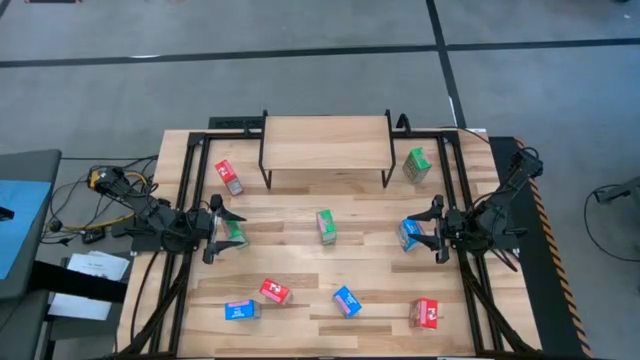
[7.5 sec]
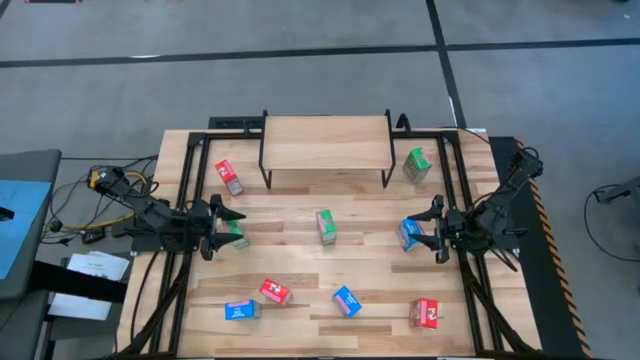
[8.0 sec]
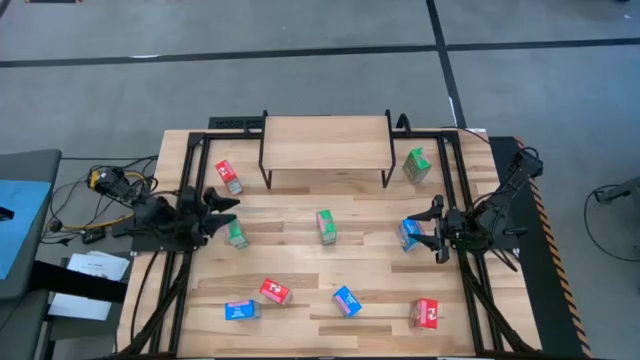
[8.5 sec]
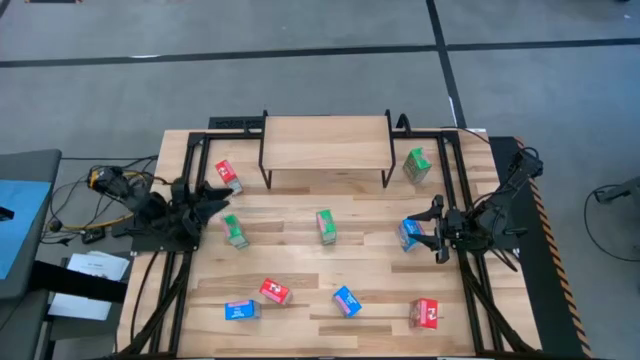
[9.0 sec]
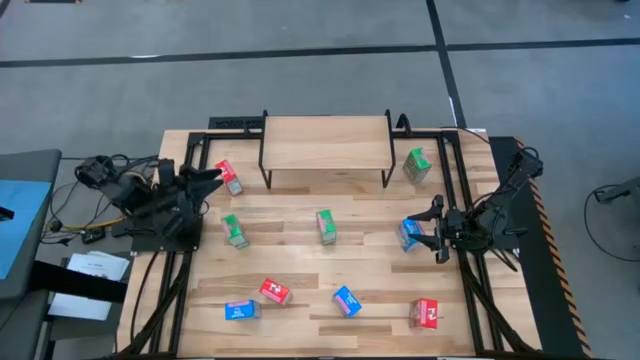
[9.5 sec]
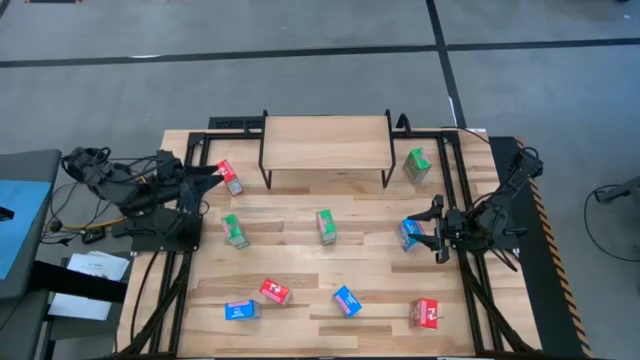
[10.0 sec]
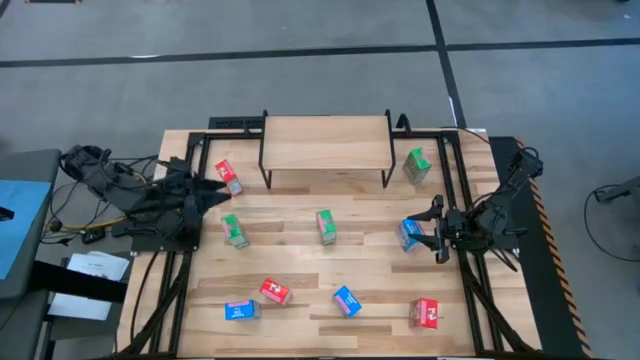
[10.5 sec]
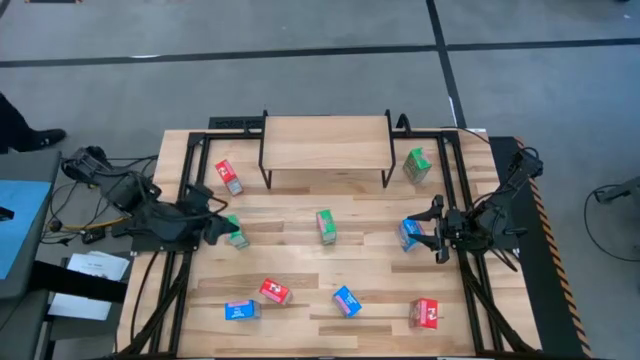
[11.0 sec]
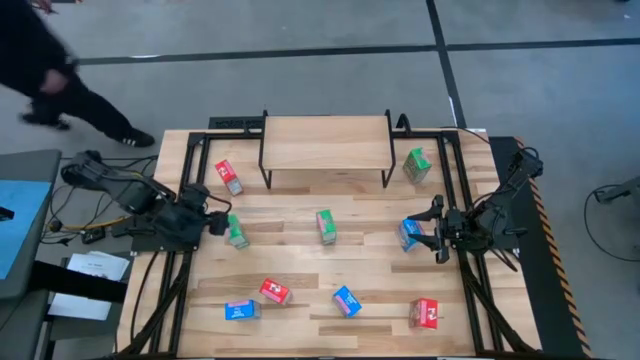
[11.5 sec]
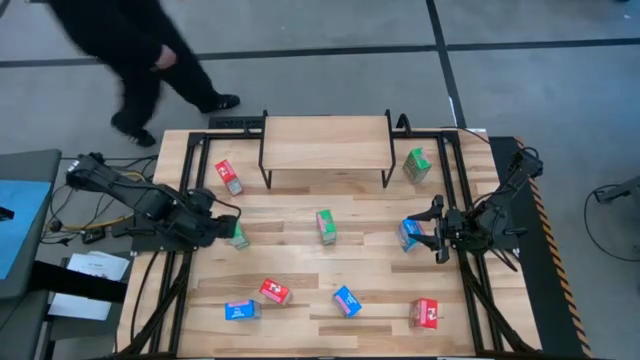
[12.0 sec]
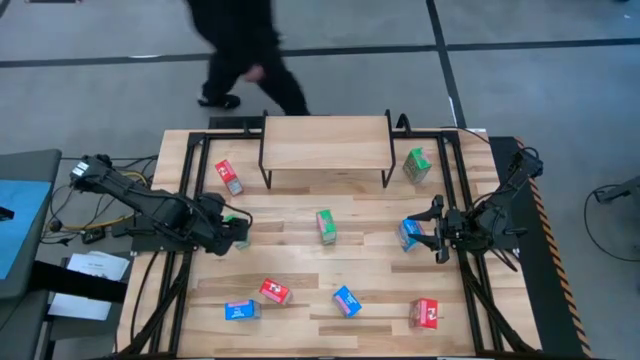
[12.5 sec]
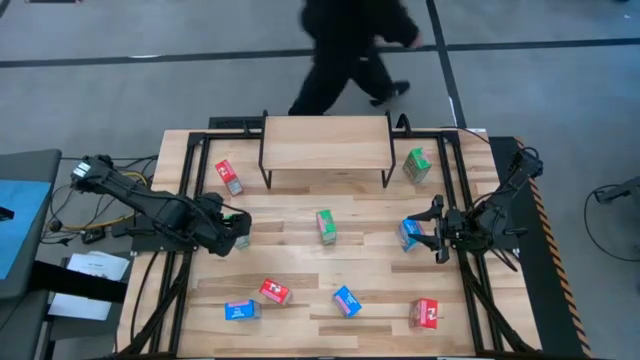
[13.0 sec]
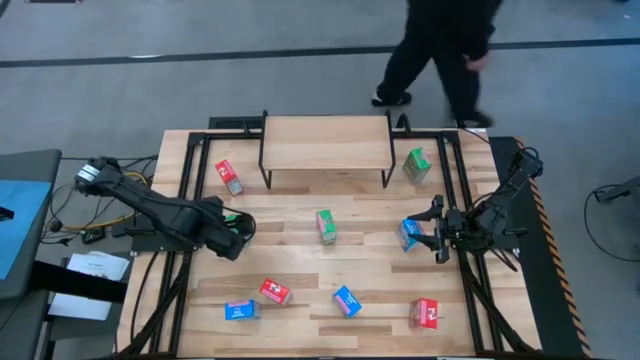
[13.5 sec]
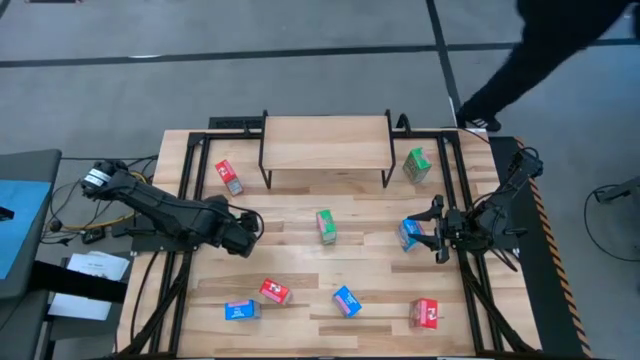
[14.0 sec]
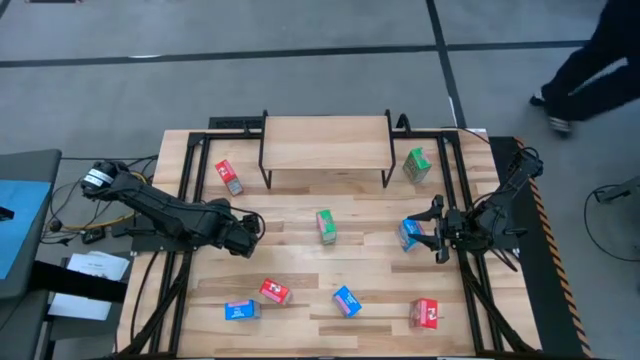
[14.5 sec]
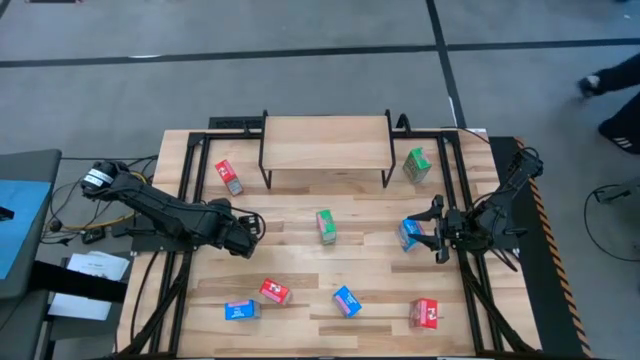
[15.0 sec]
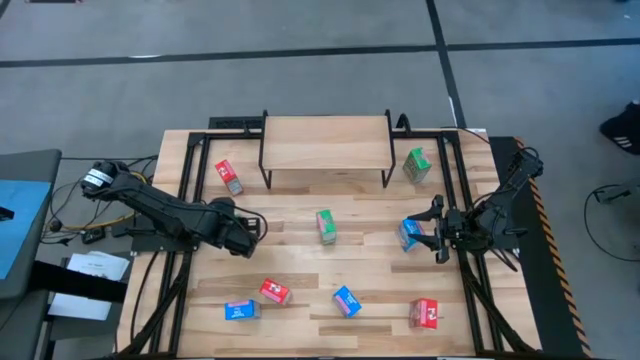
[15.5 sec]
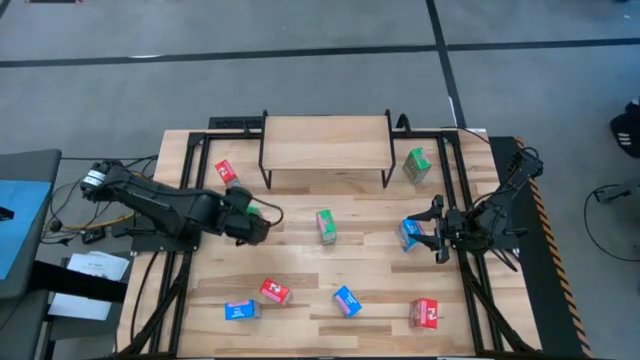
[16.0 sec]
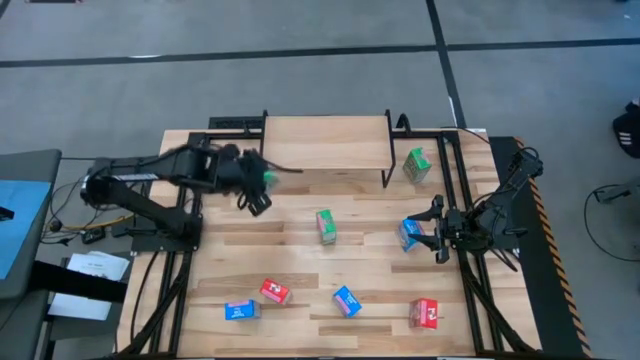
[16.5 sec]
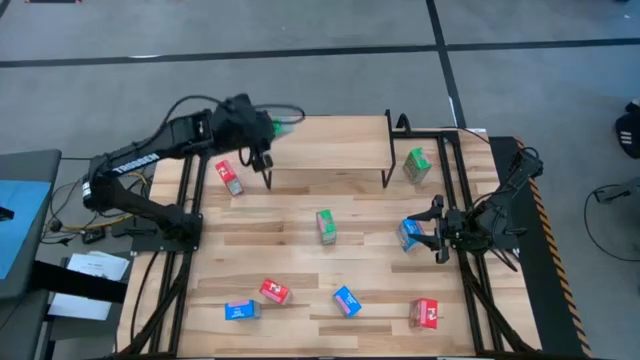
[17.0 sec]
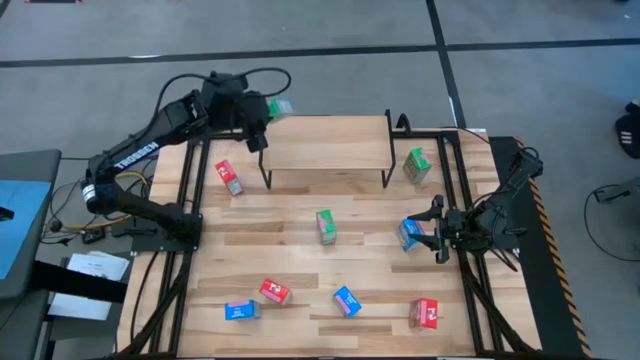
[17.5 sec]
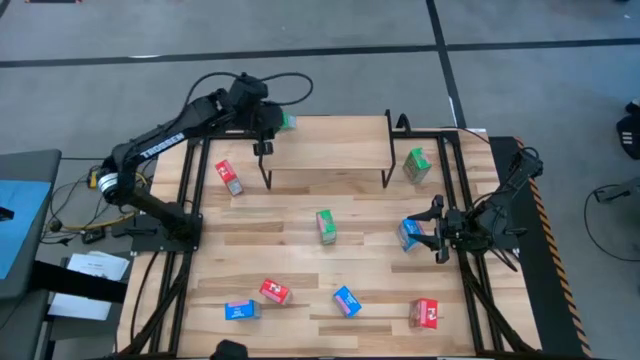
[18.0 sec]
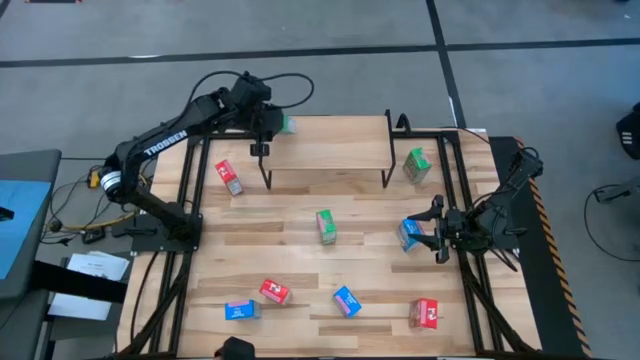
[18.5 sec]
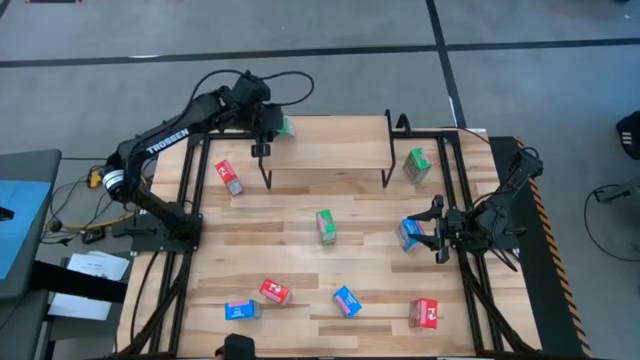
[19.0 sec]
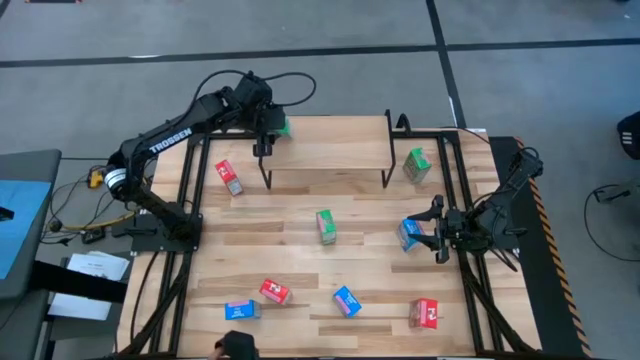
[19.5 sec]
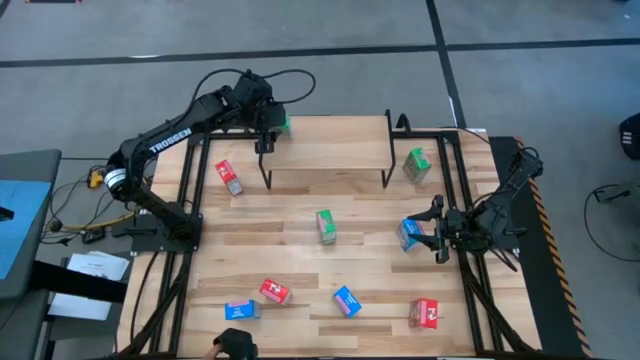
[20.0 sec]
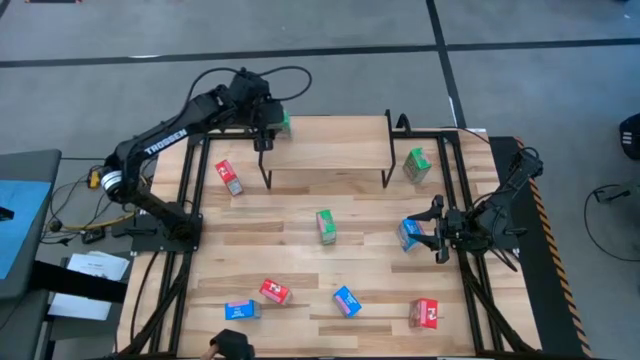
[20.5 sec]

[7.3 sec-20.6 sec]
Task: Stack cereal on shelf
Put the bottom left green cereal box on the shelf

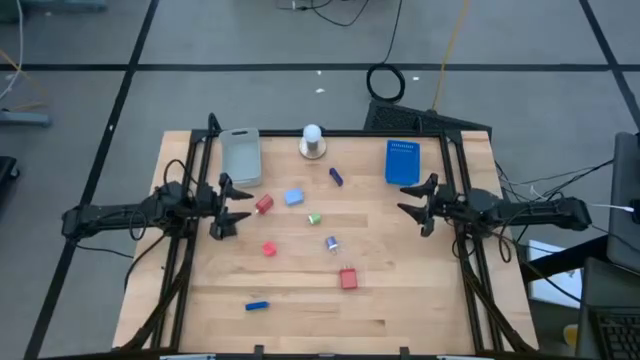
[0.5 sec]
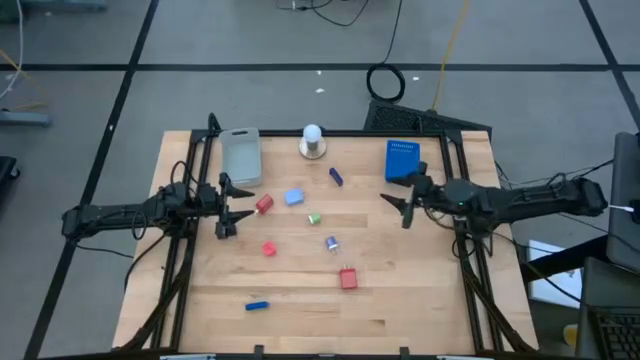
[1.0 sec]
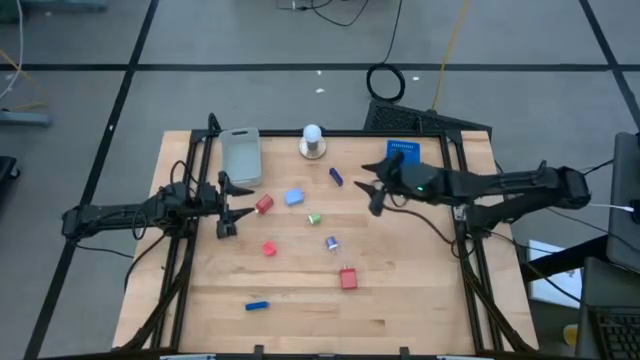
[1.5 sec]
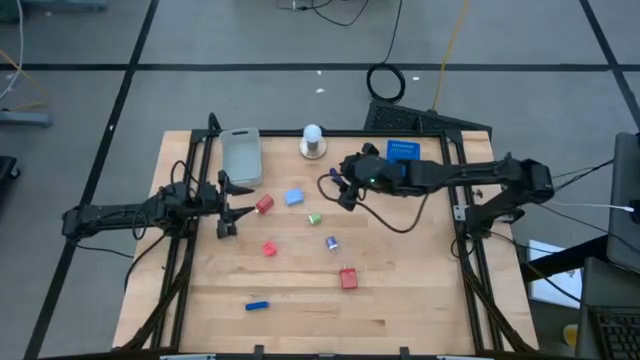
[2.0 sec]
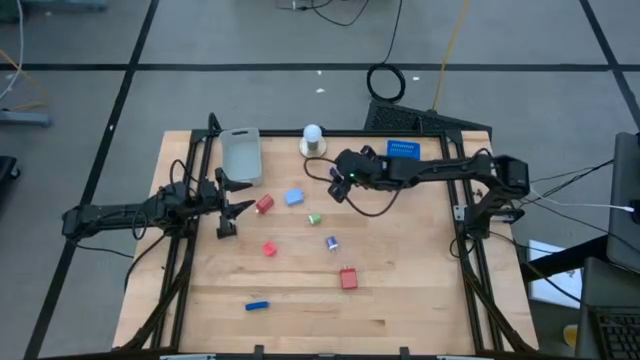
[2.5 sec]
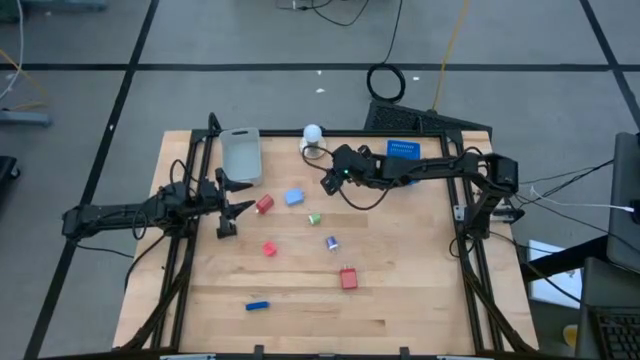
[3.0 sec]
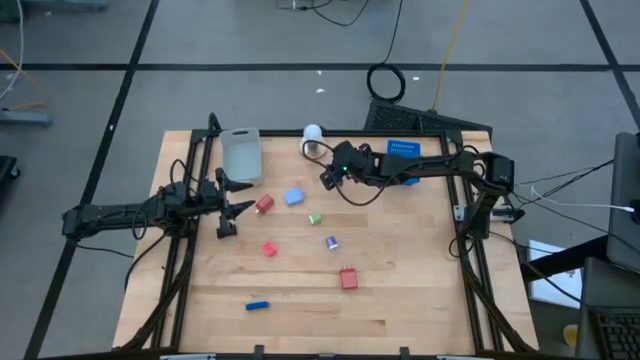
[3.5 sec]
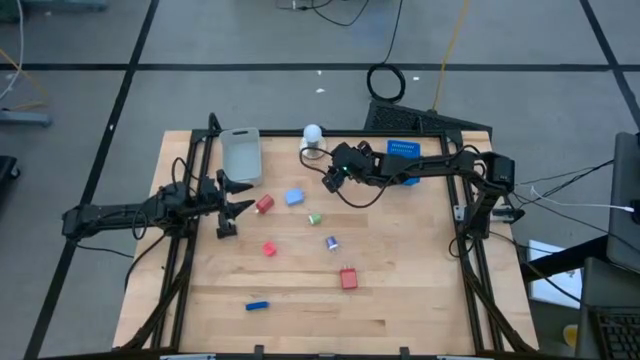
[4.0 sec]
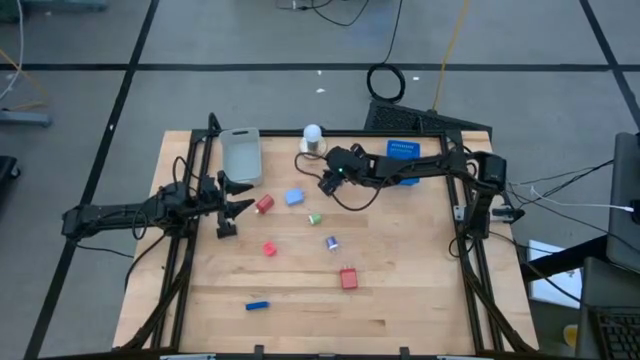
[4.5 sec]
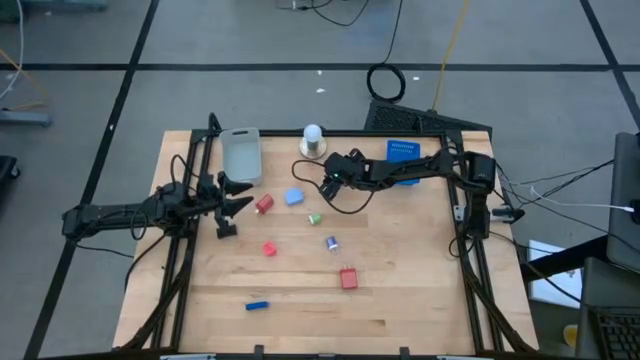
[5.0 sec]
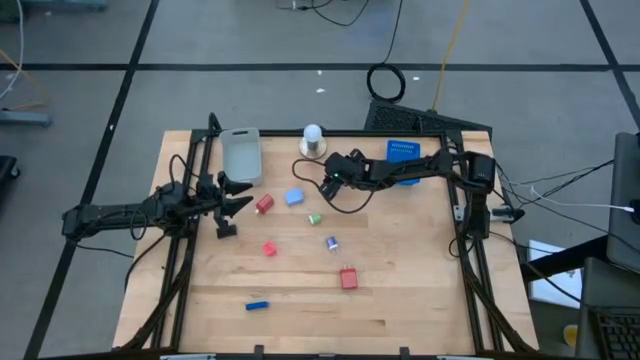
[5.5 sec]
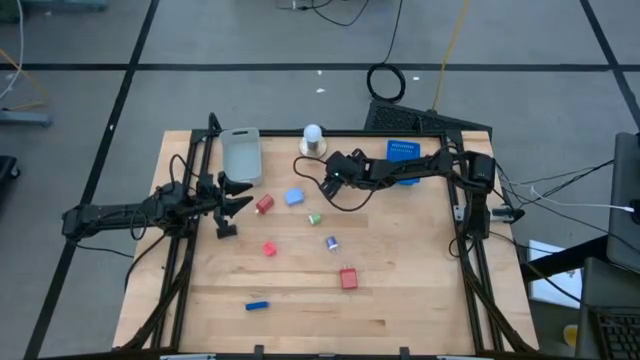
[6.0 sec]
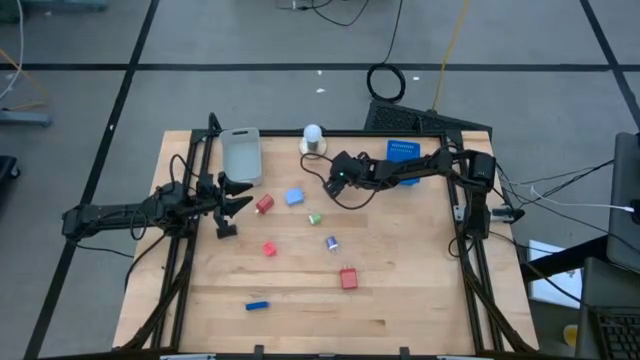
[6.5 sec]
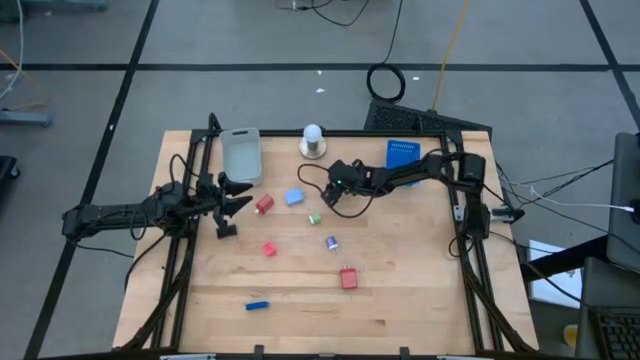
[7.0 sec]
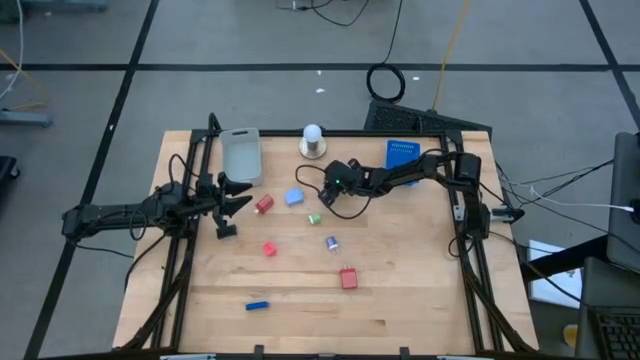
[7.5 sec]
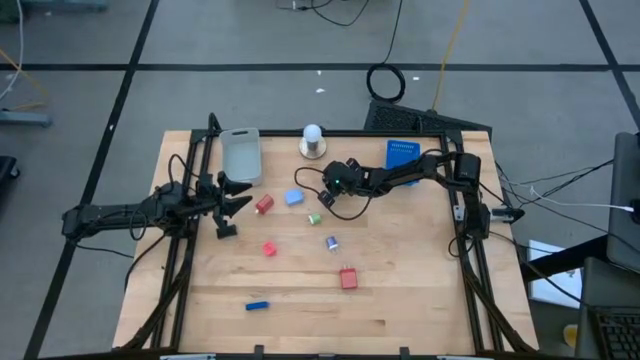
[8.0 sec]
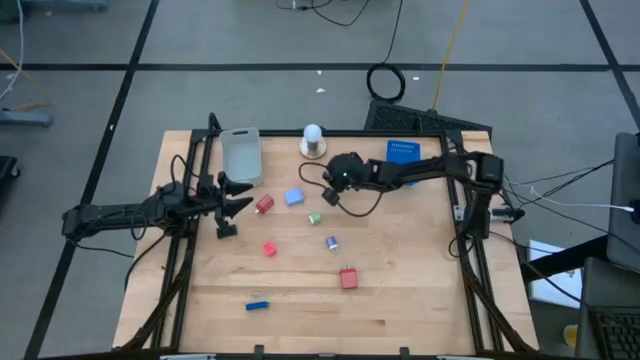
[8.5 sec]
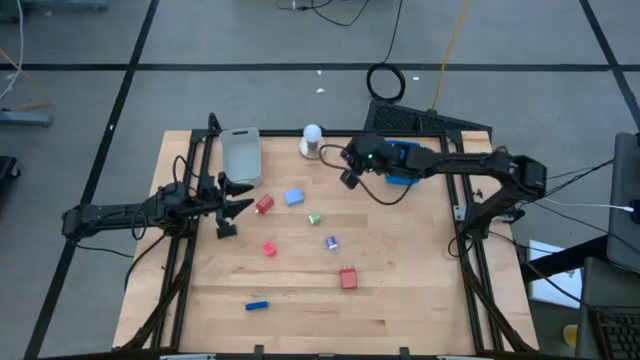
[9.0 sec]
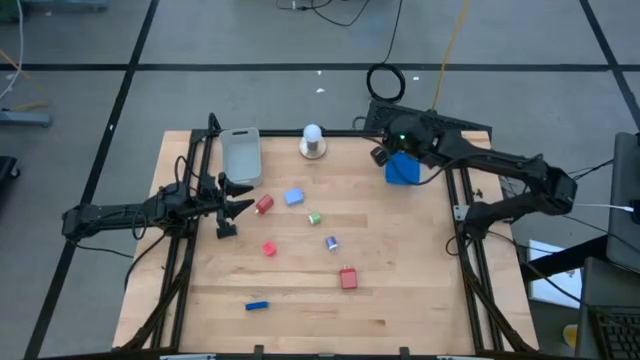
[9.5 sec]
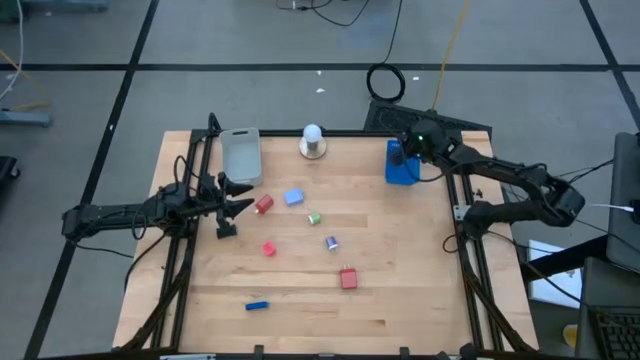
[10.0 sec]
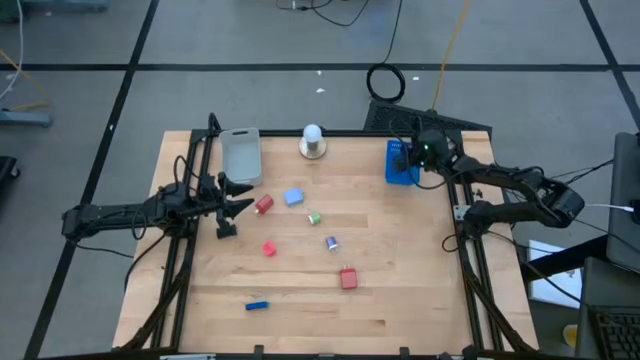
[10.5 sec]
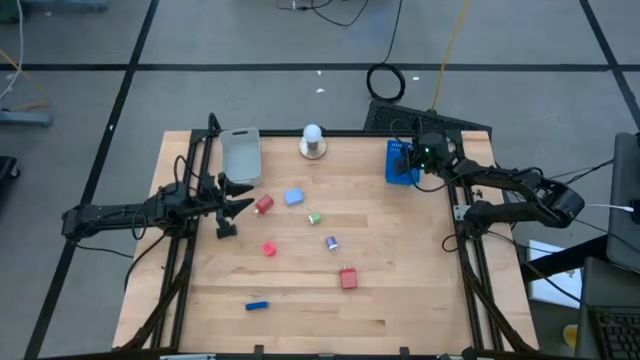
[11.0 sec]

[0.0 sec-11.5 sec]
Task: Pick & Place Office items
Put the top blue digital clock into the blue bin
